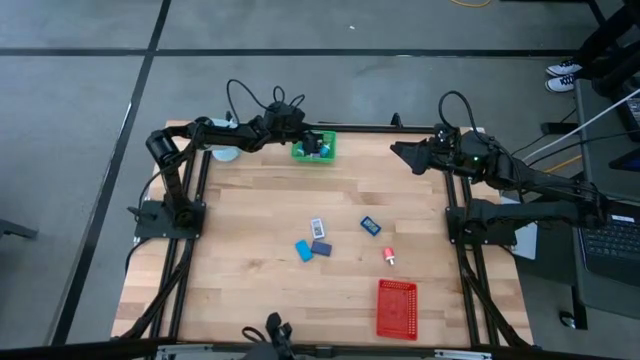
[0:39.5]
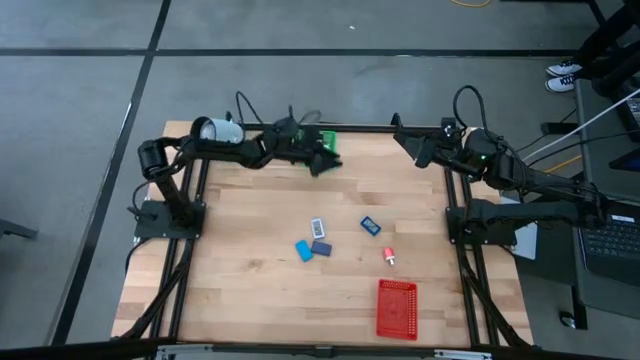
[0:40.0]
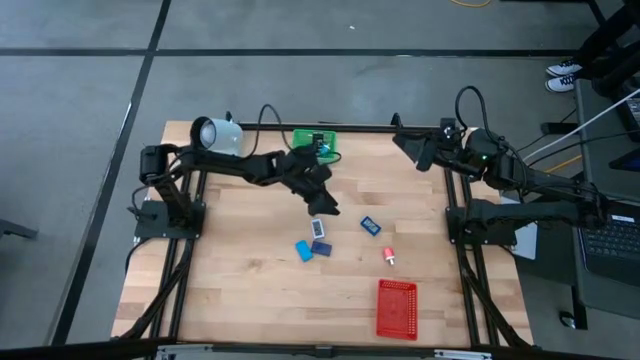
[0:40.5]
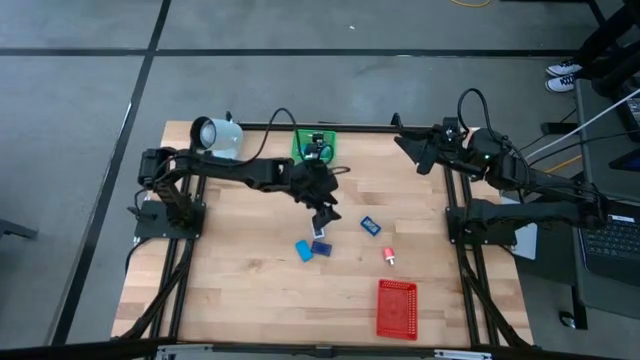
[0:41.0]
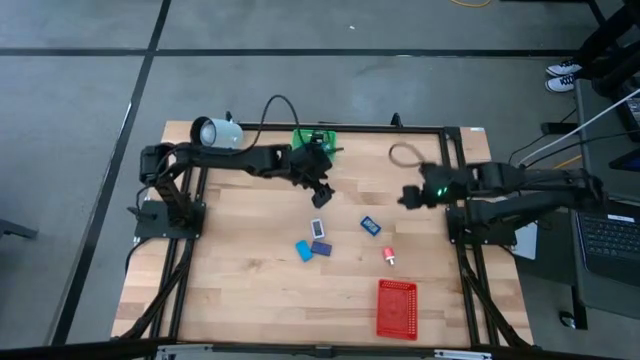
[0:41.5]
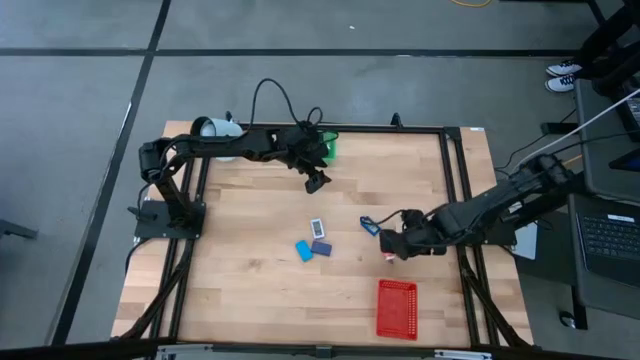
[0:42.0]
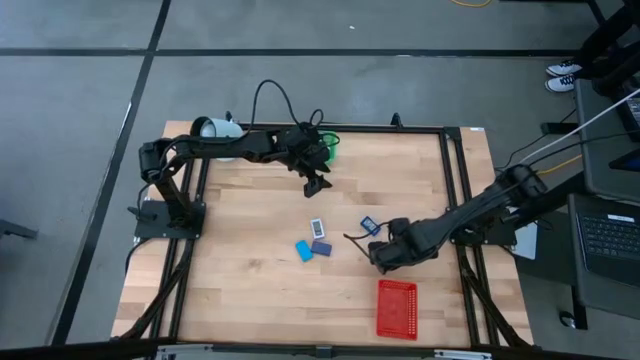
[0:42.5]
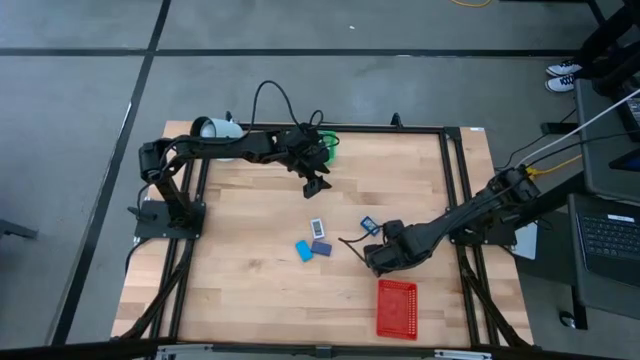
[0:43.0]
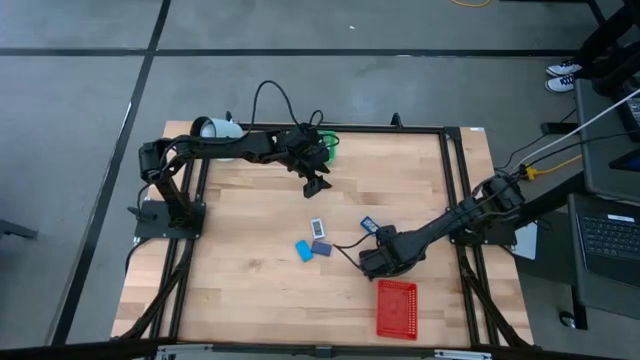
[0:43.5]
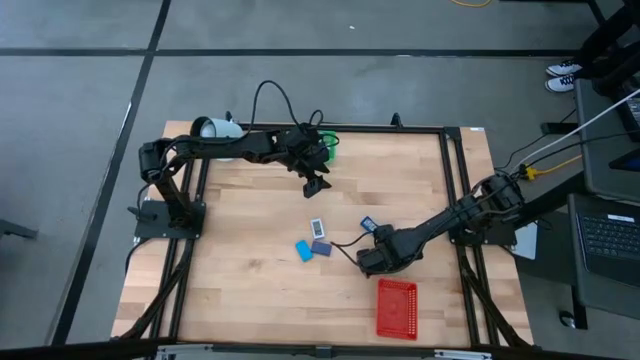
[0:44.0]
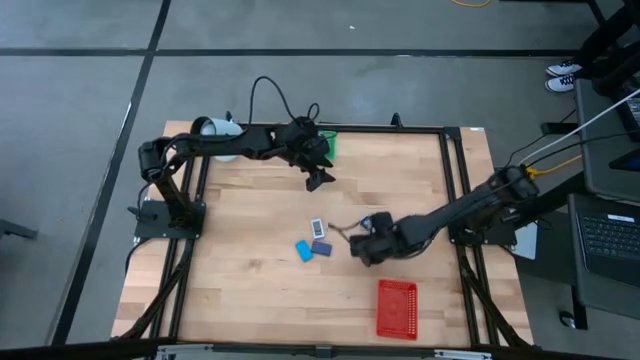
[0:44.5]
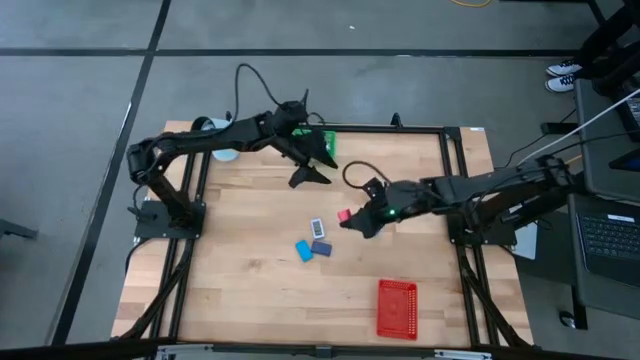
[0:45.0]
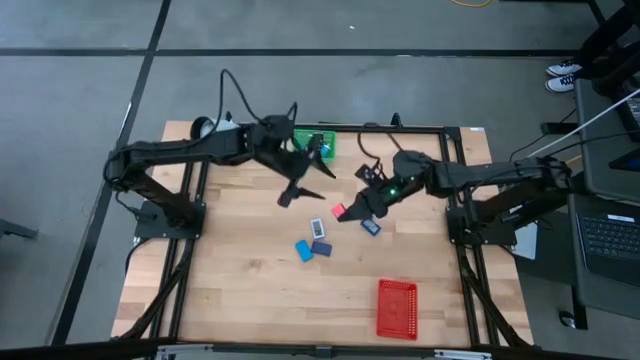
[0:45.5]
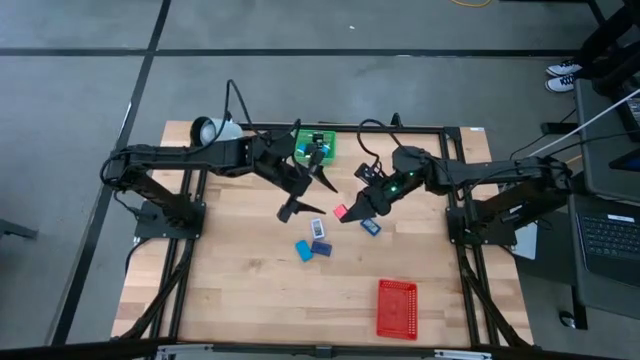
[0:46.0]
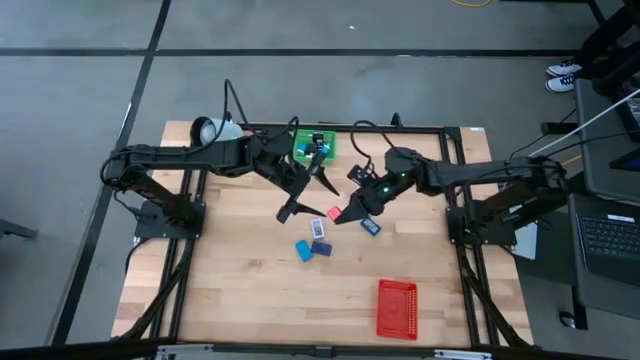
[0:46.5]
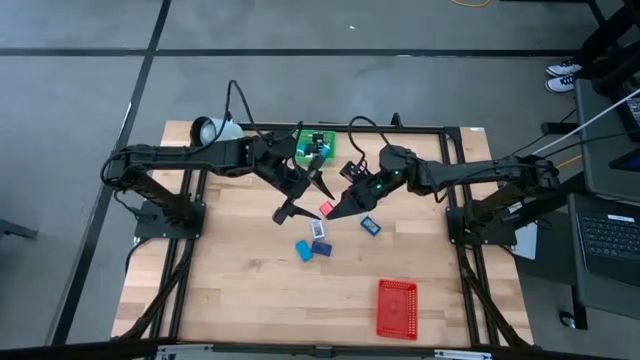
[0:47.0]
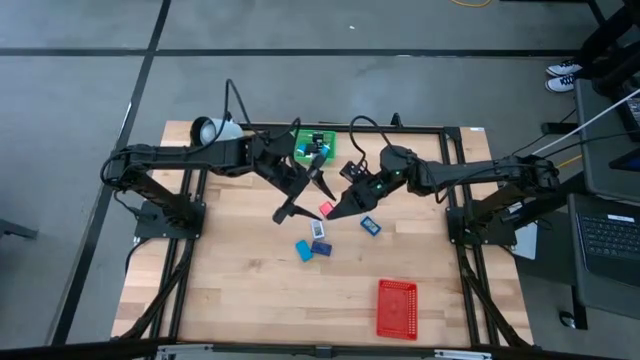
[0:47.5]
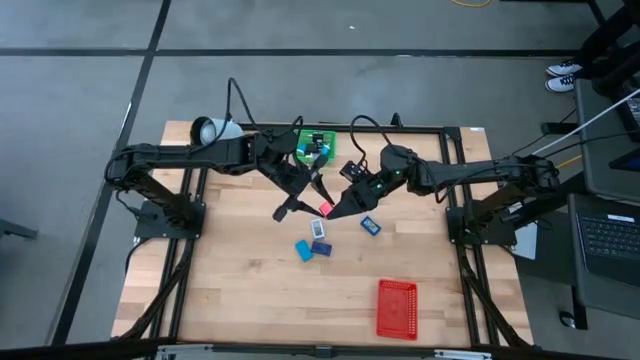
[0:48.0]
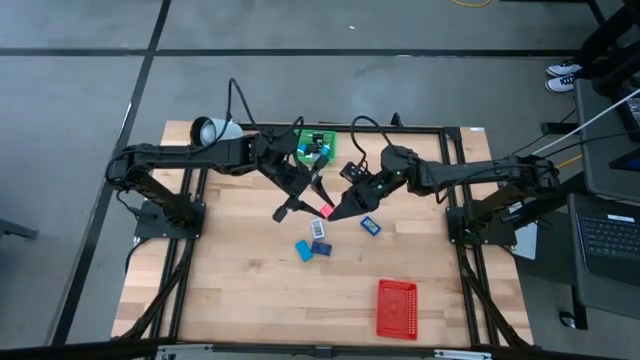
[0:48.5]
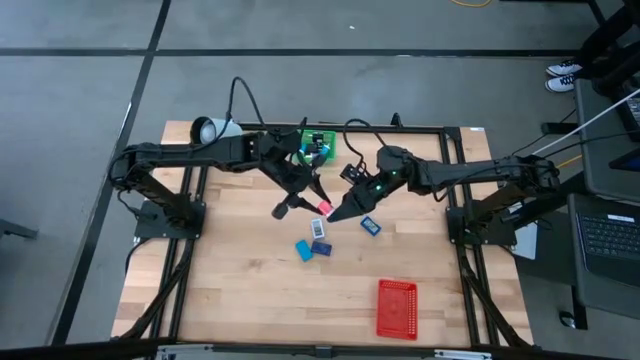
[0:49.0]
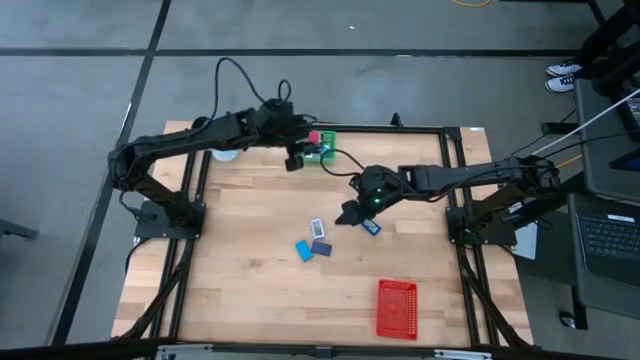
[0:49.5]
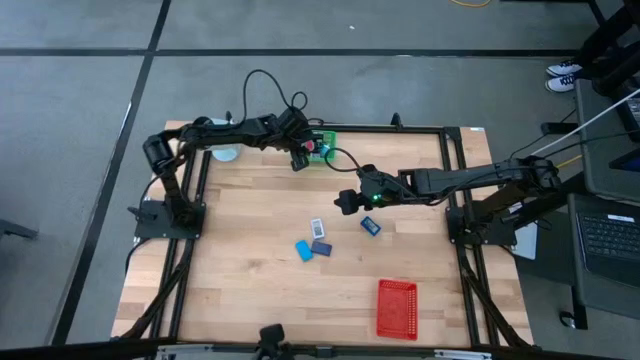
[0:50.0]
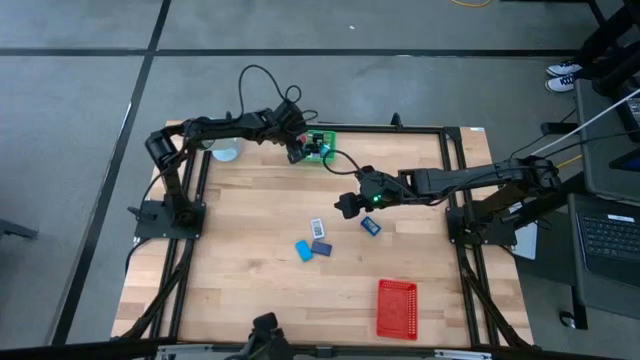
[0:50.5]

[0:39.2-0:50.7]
Task: Pick & Place Office items
Put the pink charger adapter into the green bin

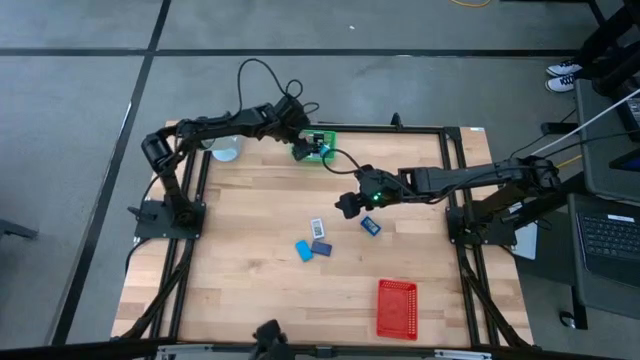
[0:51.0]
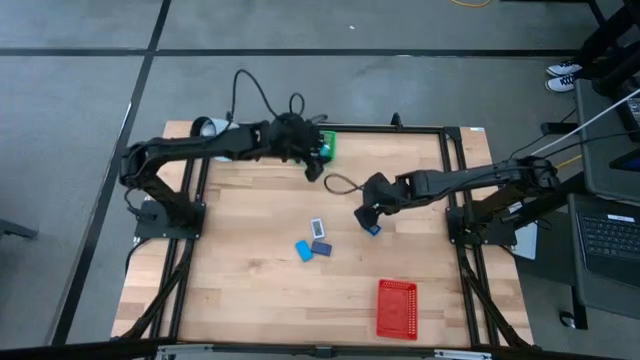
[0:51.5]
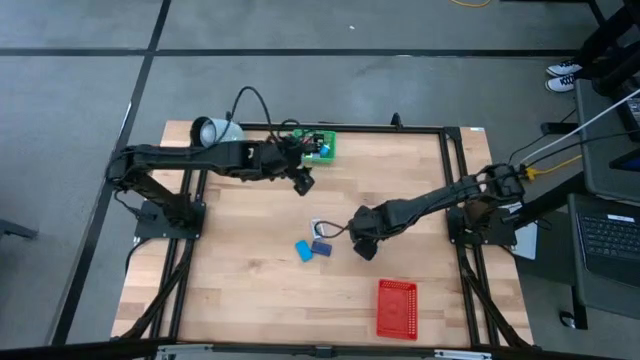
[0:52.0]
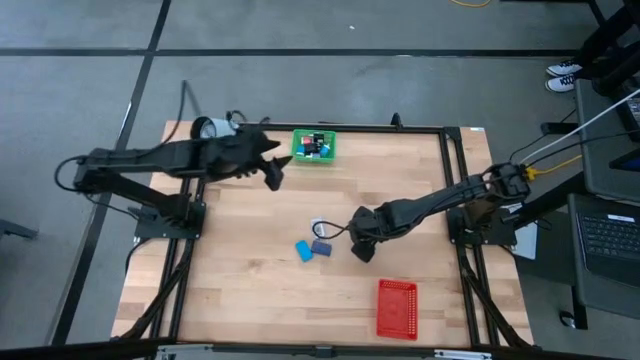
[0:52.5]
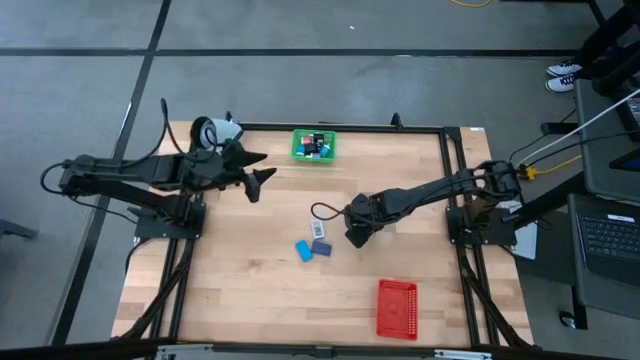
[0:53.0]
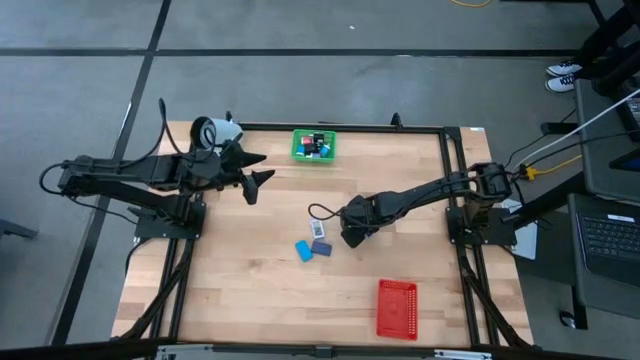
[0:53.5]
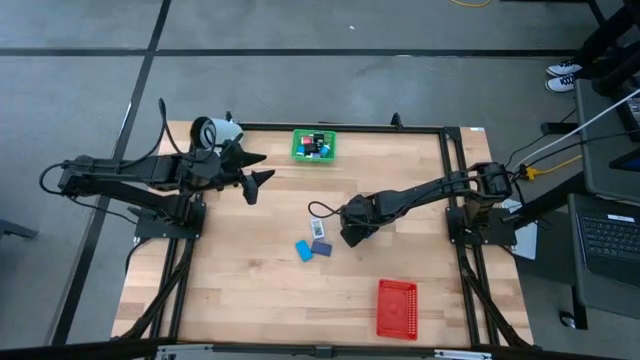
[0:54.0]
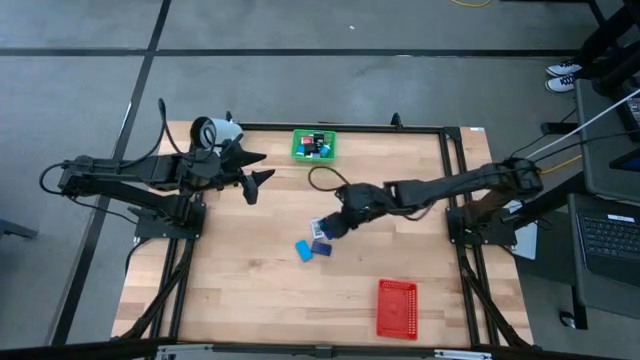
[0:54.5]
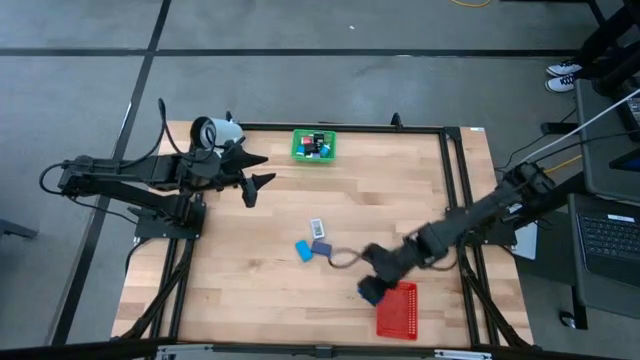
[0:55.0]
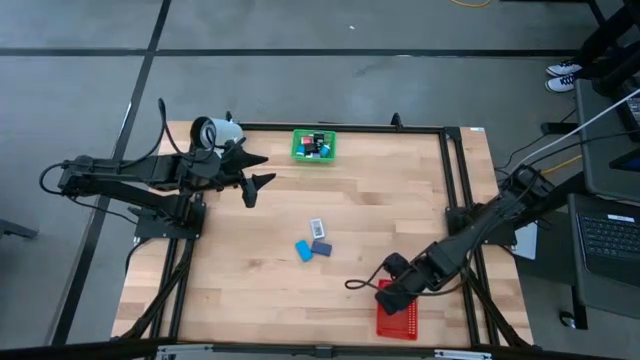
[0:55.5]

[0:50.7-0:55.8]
Put the blue digital timer into the red bin

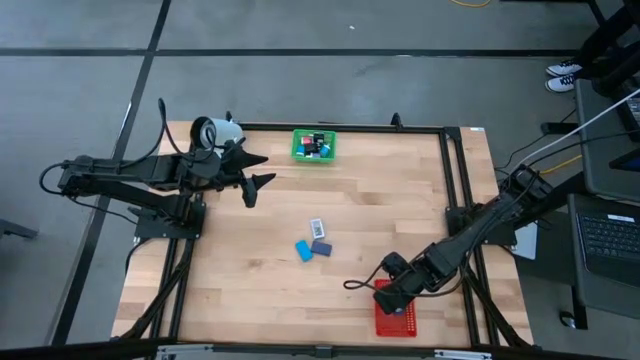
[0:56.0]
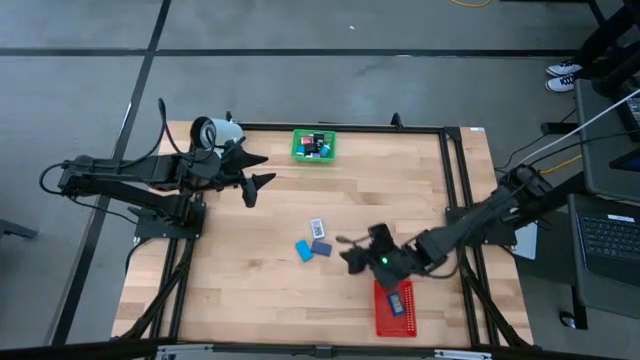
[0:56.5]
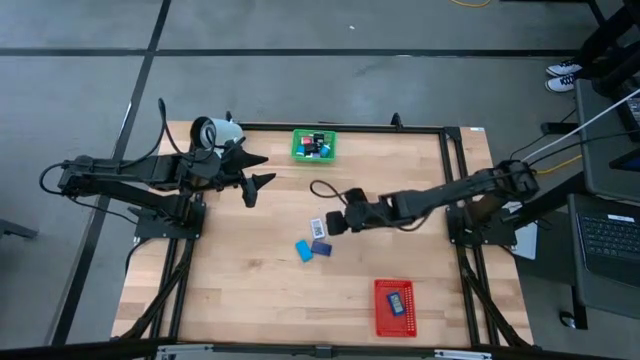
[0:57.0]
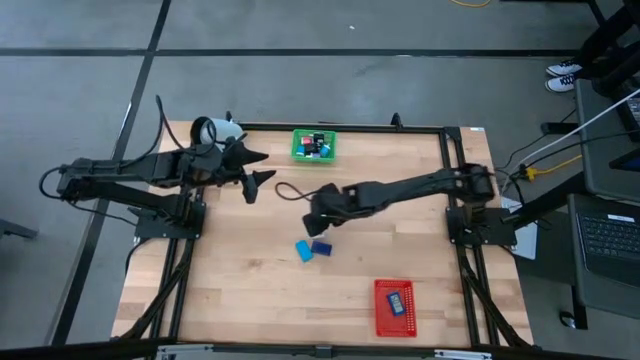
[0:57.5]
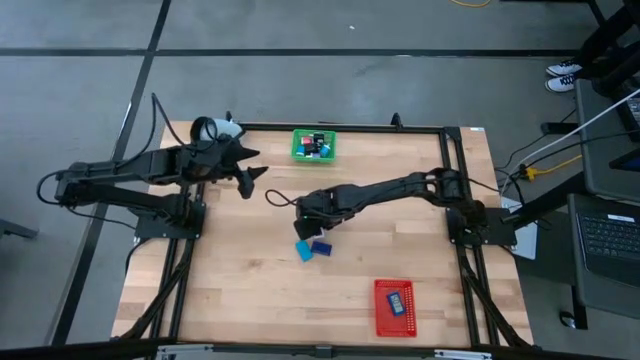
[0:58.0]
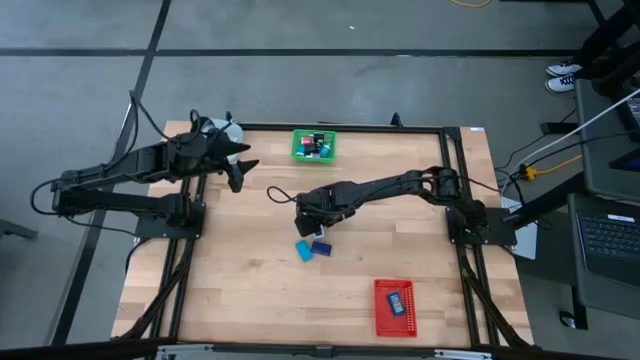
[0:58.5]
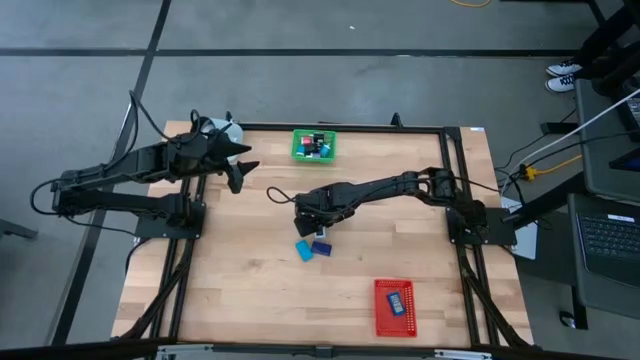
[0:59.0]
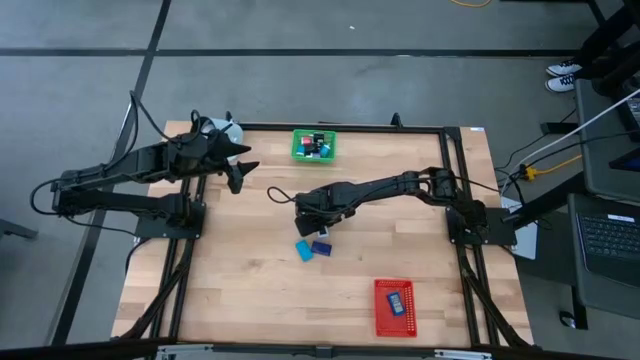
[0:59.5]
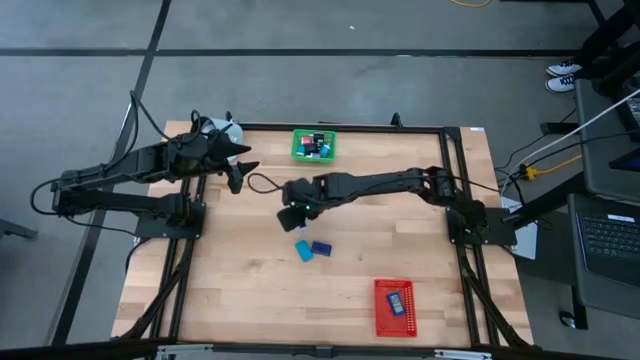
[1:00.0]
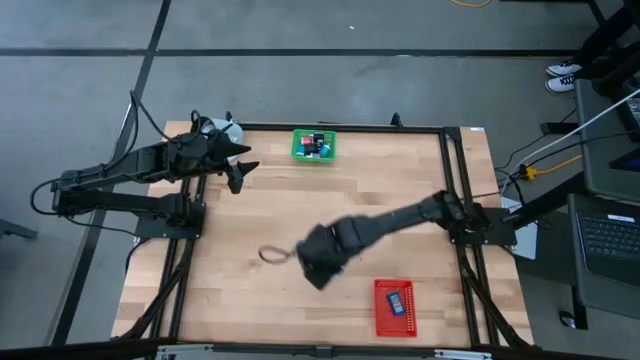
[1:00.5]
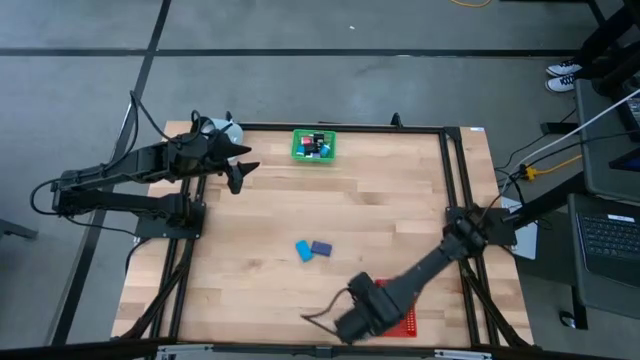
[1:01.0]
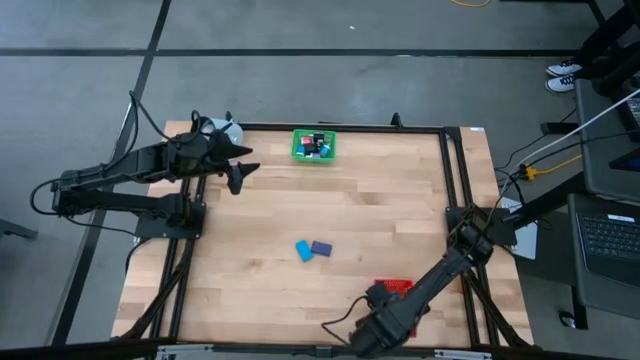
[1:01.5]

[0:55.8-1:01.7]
Put the white digital timer into the red bin
